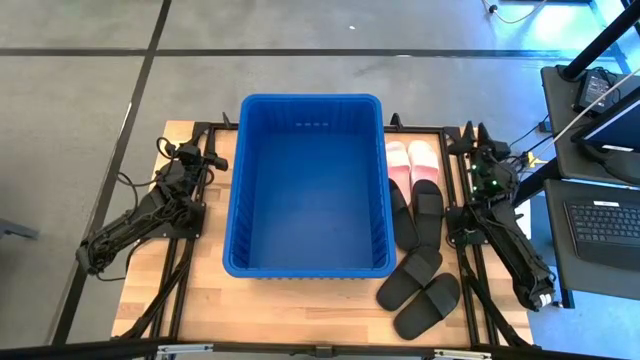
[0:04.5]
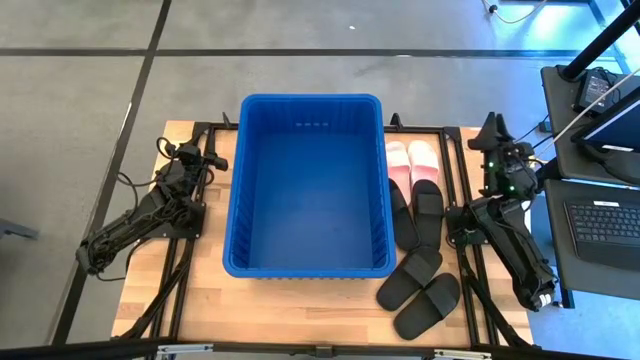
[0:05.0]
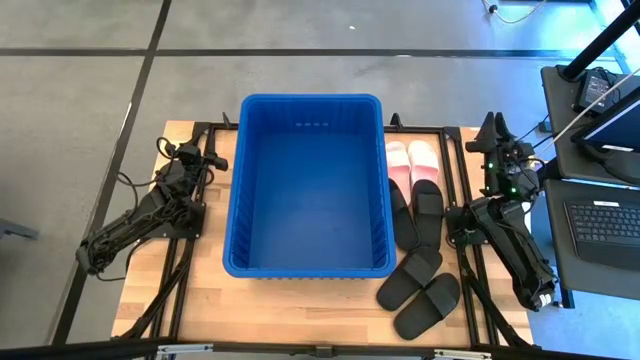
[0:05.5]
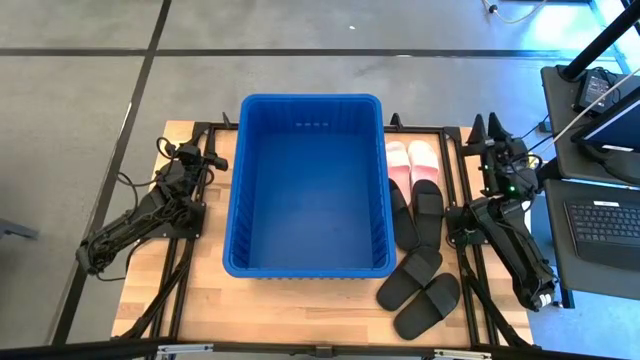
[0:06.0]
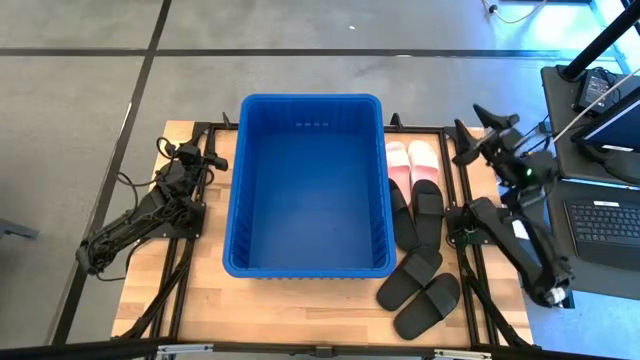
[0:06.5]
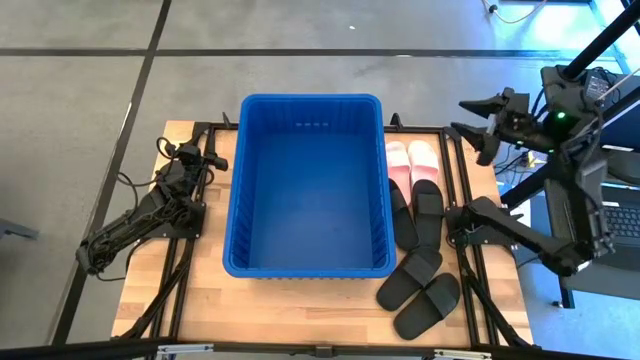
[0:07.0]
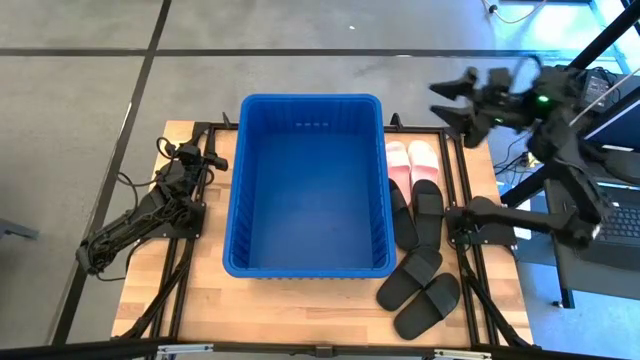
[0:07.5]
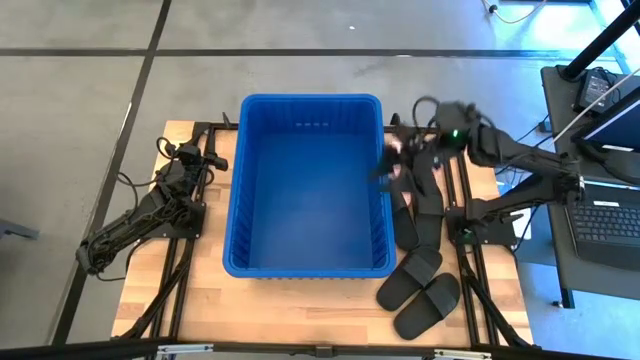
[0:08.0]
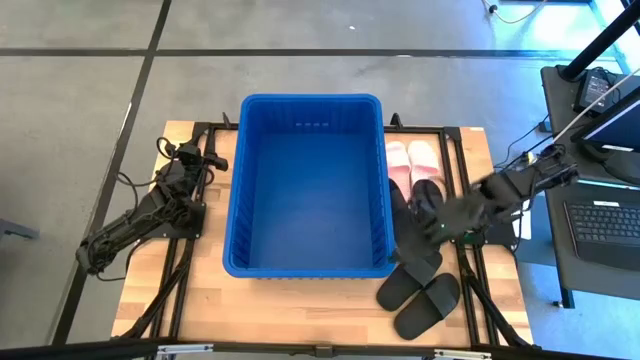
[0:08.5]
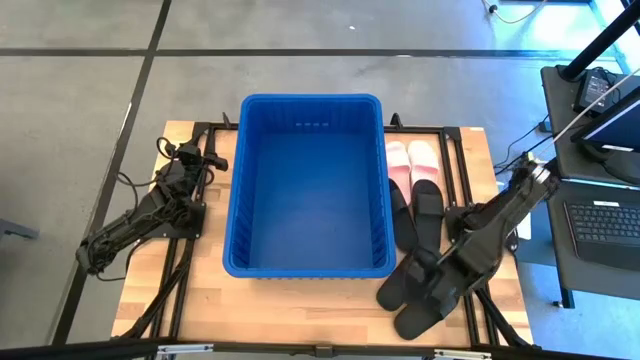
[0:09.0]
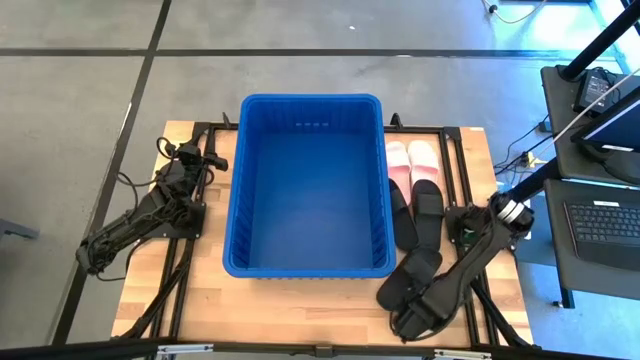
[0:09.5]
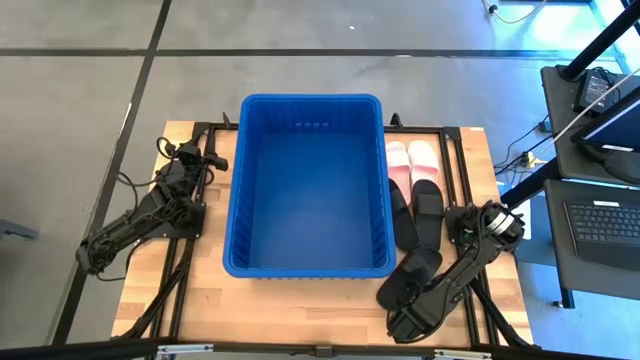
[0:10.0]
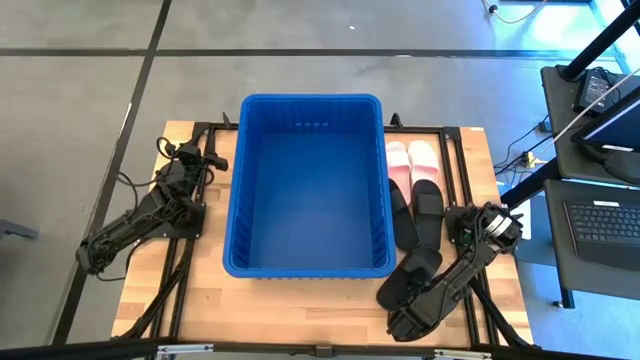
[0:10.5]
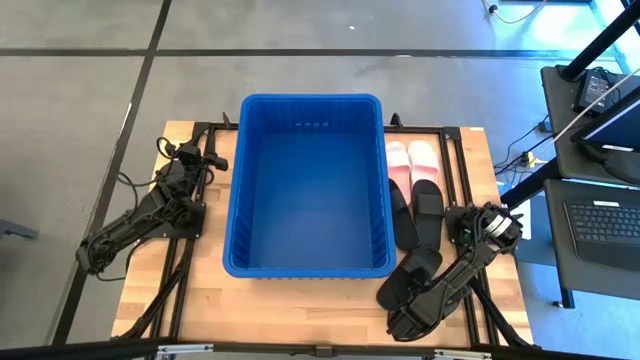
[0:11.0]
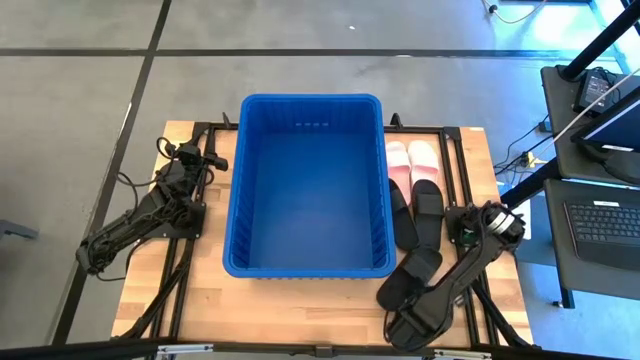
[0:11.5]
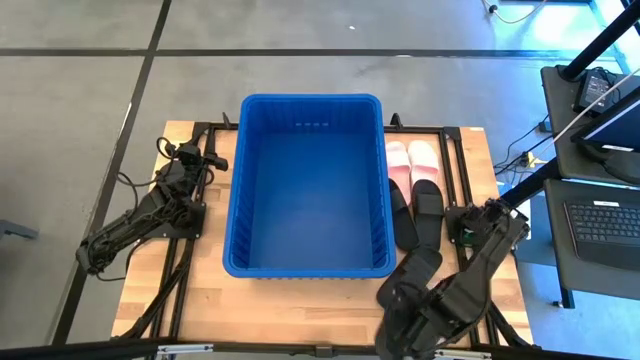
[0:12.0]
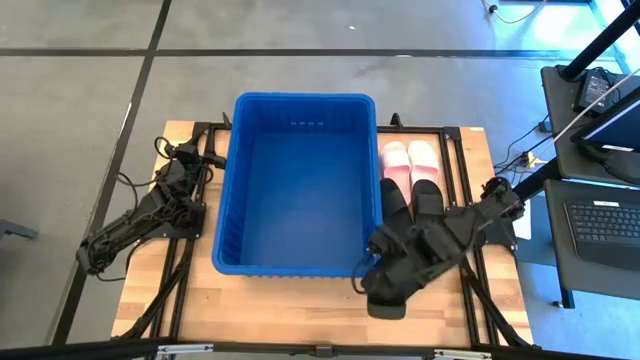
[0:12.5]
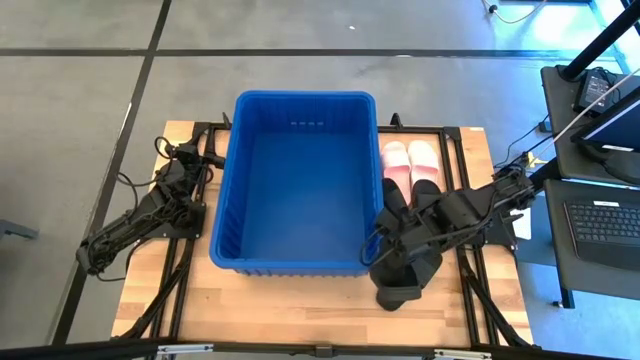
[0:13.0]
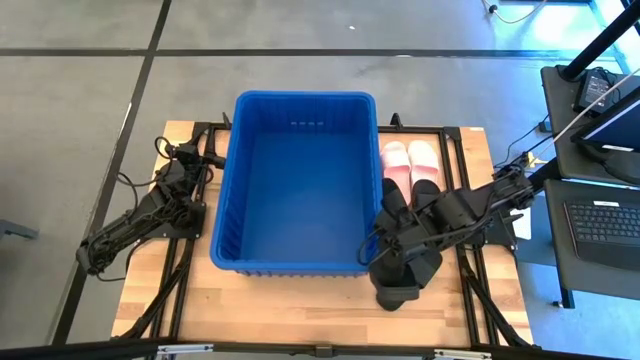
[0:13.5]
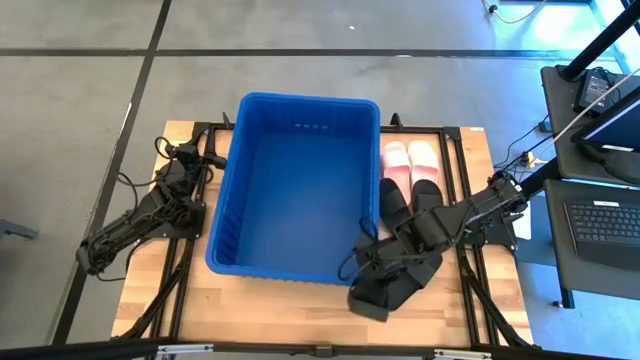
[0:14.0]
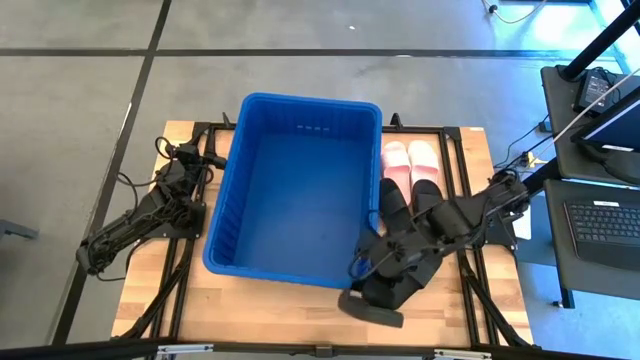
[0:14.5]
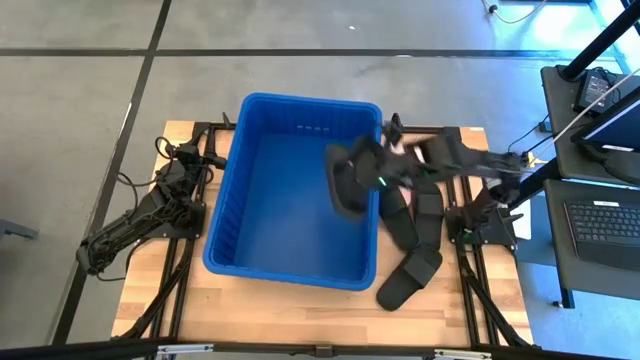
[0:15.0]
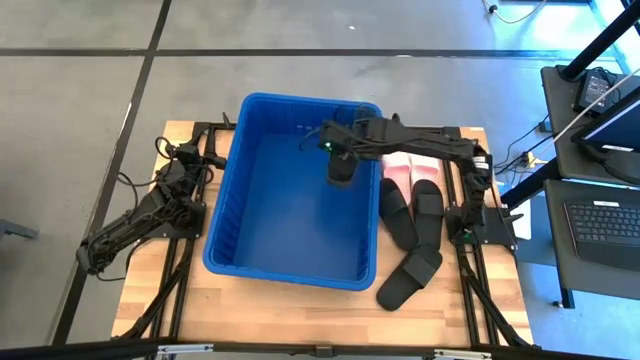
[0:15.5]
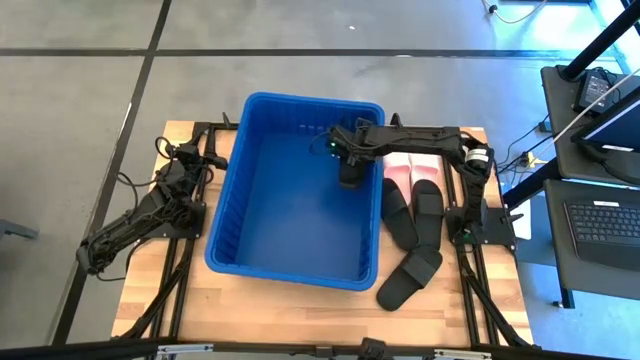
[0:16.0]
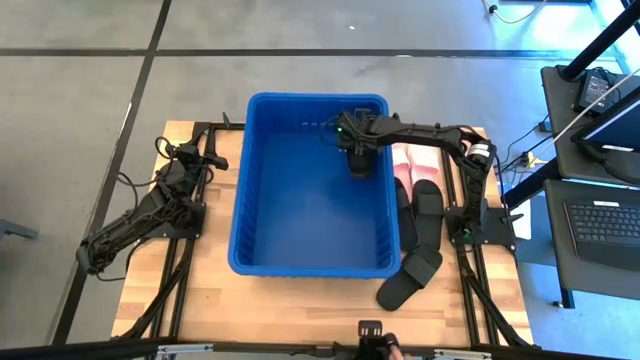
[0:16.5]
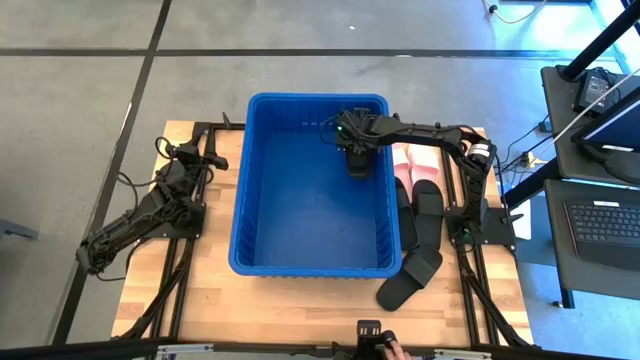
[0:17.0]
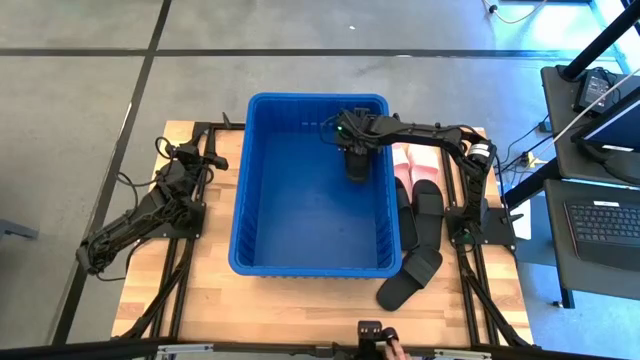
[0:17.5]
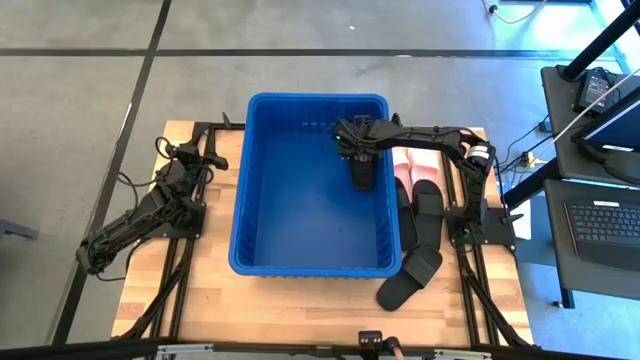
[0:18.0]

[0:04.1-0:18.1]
Task: Pick and place slides into bin
Put the black slipper into the blue bin

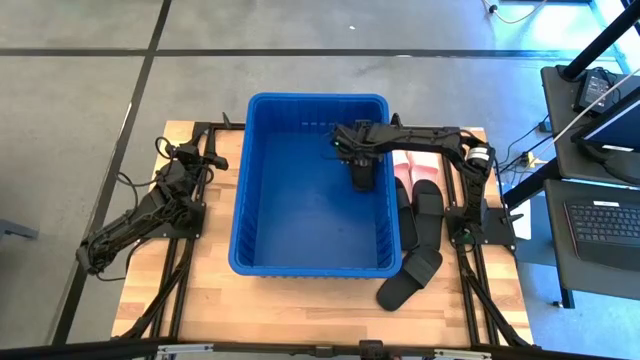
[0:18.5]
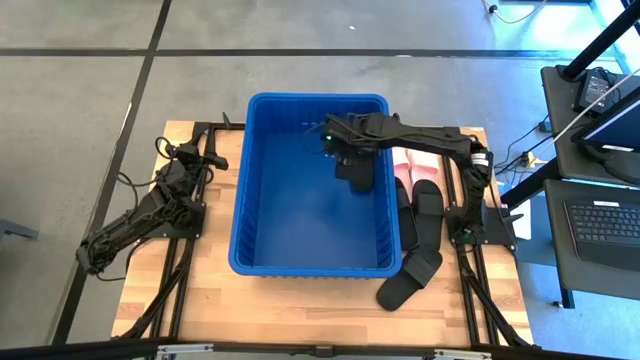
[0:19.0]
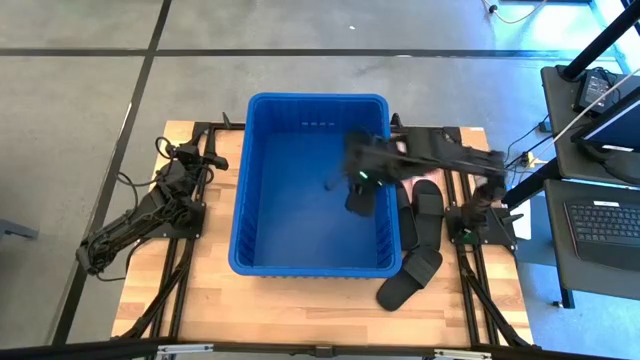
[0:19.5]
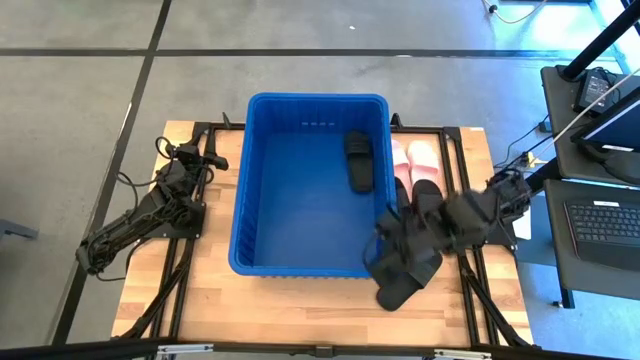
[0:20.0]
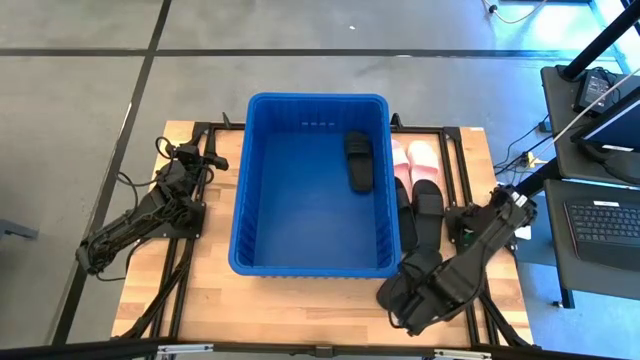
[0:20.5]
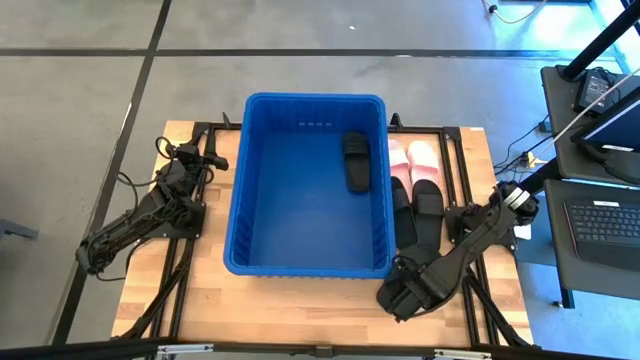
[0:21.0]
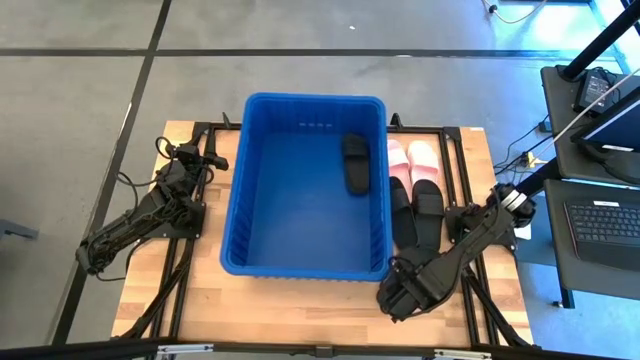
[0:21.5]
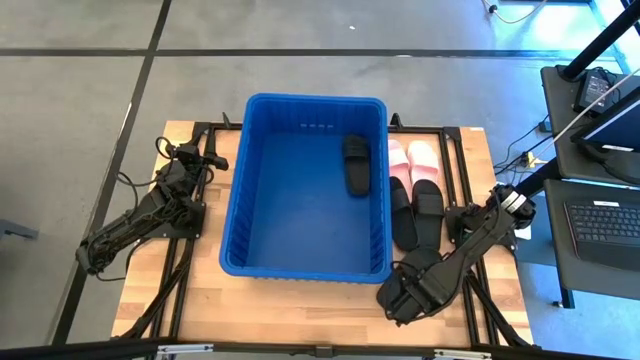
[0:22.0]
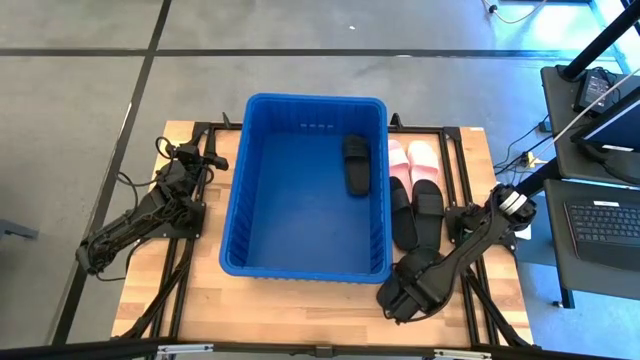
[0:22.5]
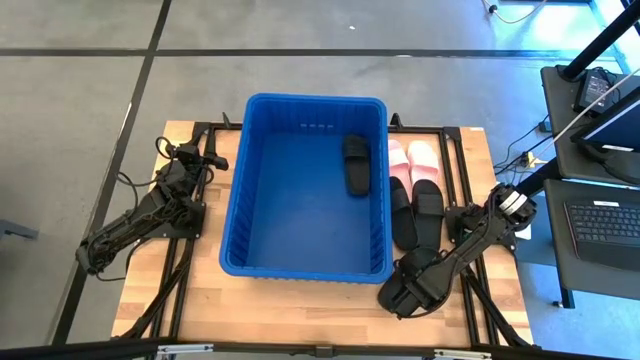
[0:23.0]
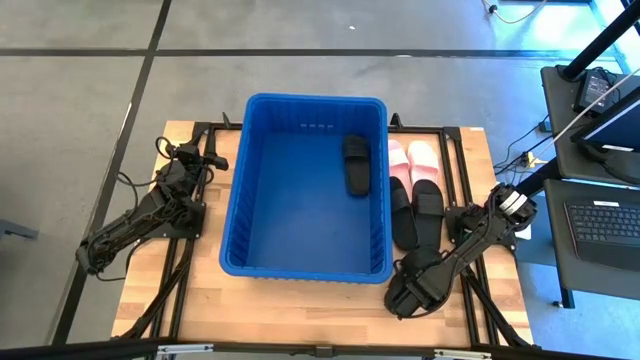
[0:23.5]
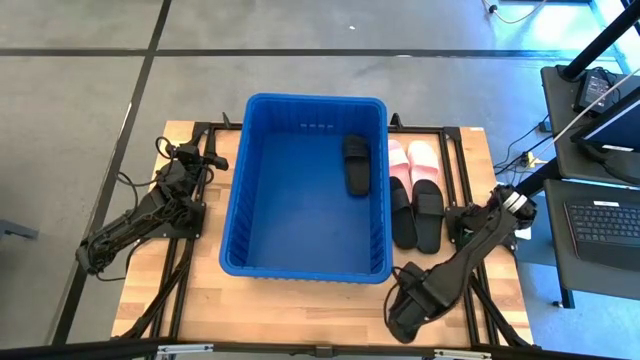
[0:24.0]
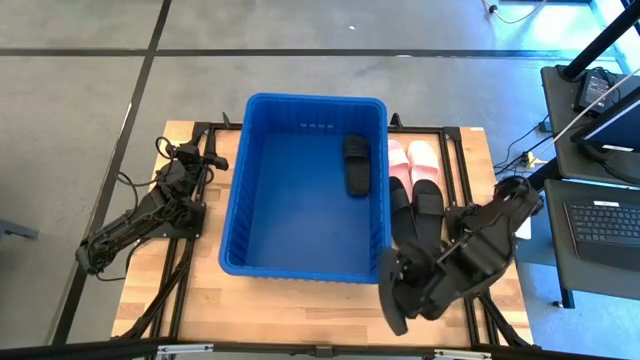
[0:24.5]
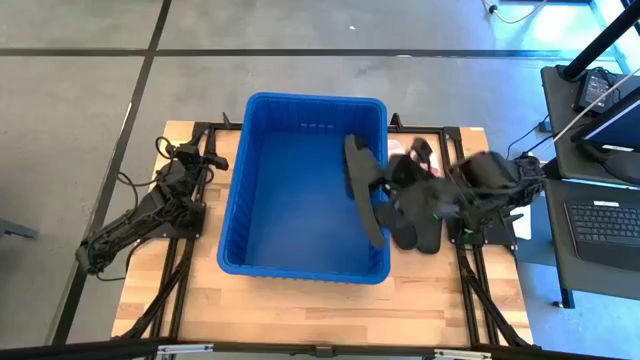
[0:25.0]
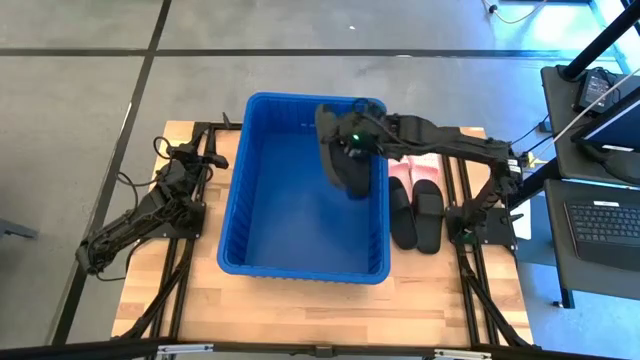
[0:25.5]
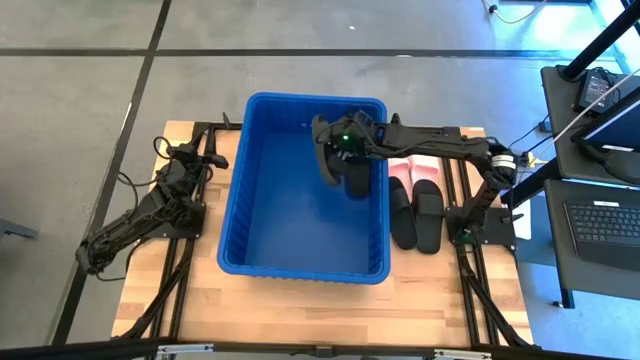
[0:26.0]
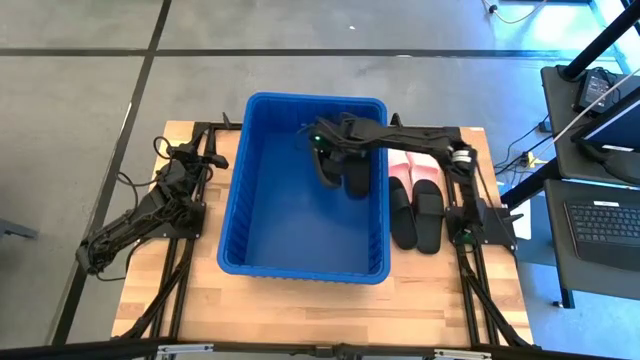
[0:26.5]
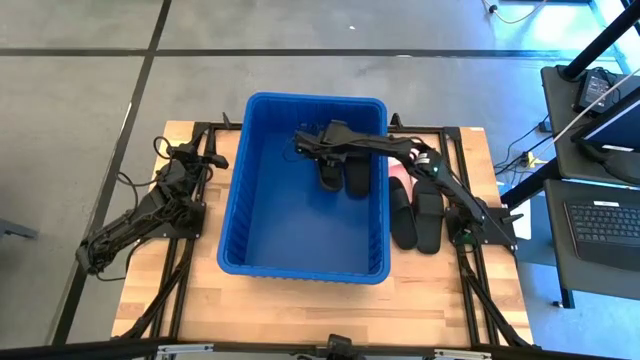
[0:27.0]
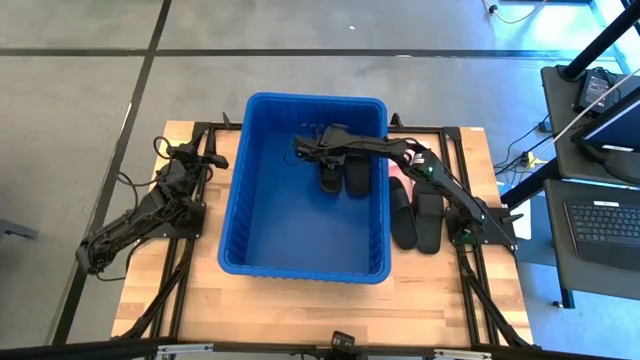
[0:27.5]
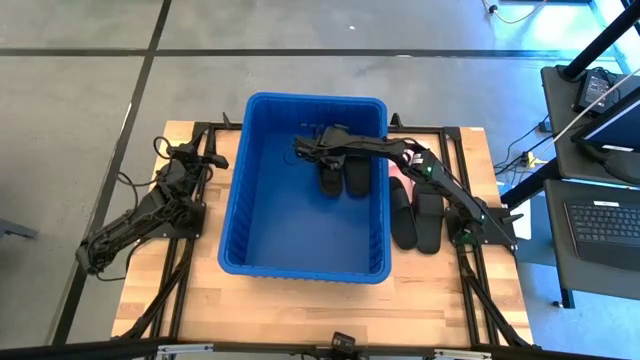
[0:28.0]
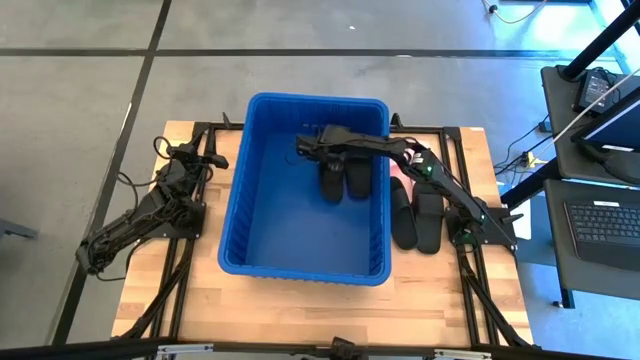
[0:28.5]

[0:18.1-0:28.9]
Put the black slipper into the blue bin
